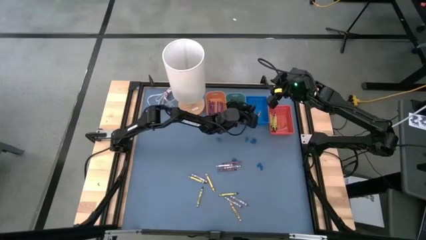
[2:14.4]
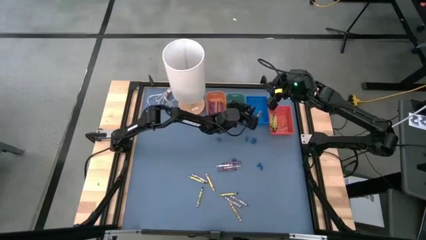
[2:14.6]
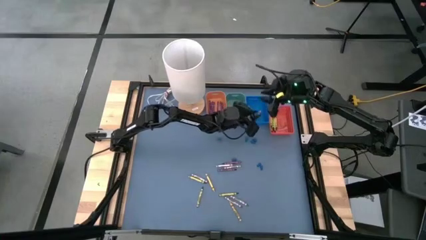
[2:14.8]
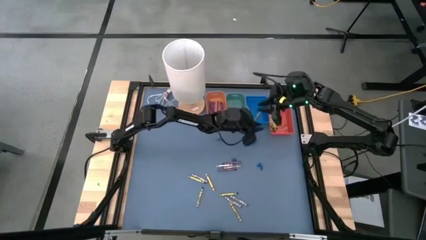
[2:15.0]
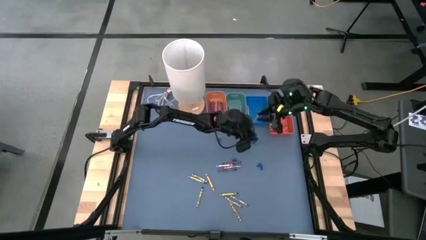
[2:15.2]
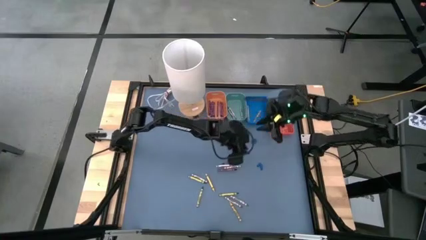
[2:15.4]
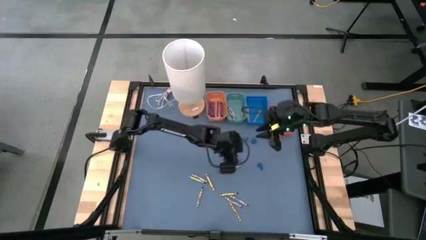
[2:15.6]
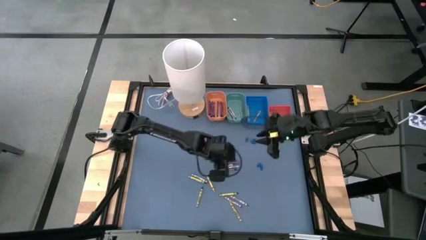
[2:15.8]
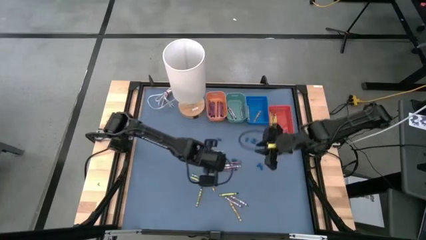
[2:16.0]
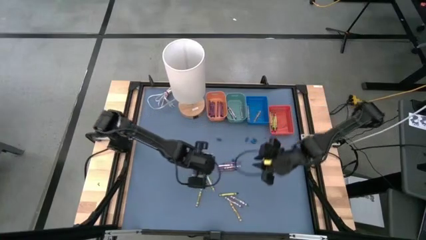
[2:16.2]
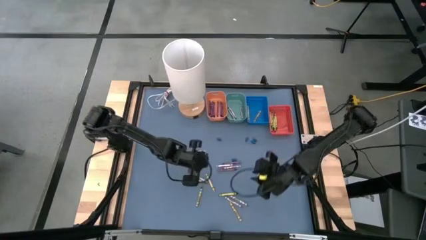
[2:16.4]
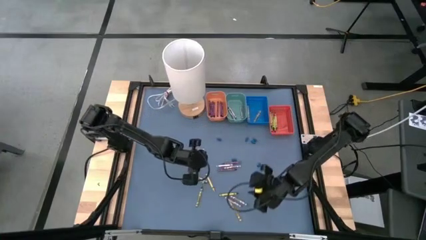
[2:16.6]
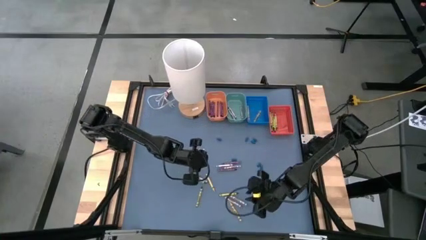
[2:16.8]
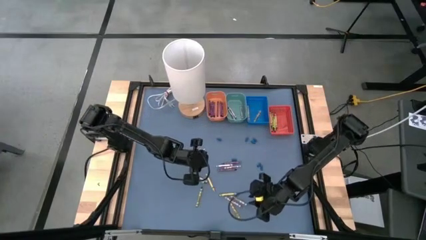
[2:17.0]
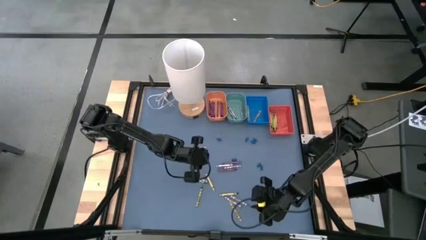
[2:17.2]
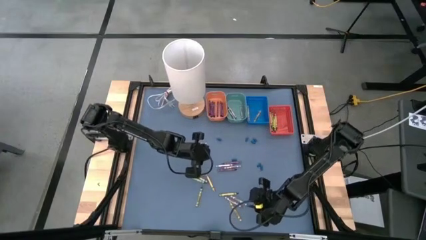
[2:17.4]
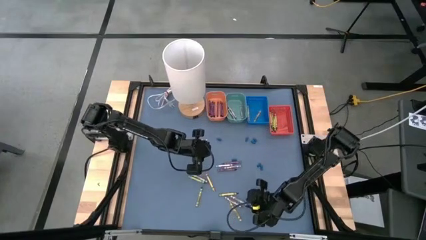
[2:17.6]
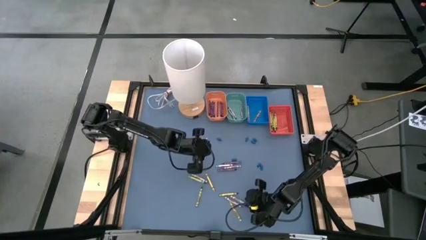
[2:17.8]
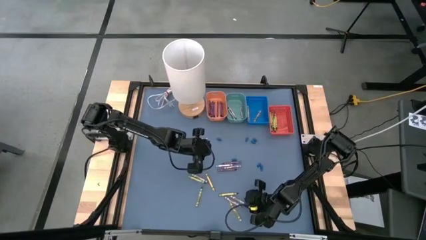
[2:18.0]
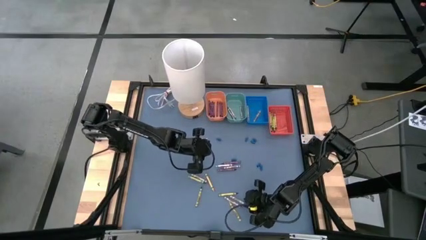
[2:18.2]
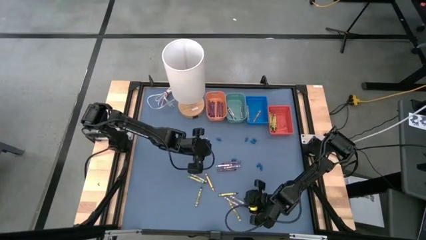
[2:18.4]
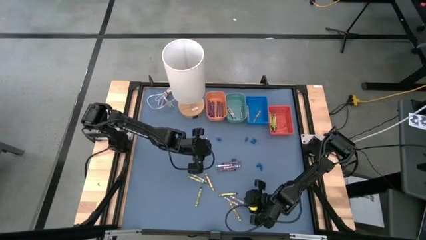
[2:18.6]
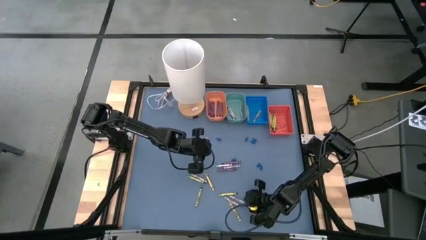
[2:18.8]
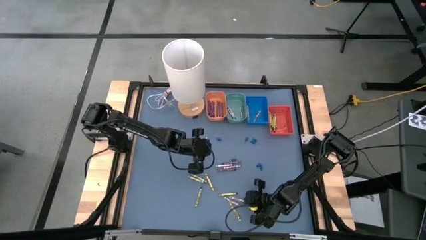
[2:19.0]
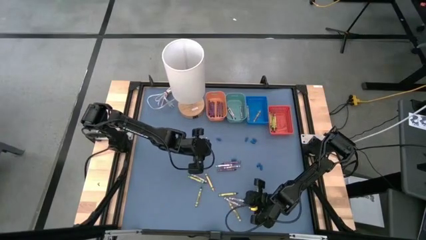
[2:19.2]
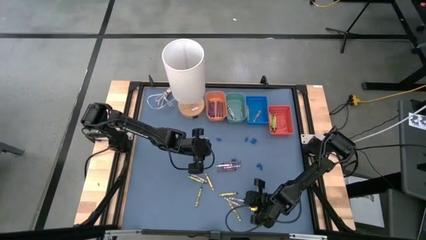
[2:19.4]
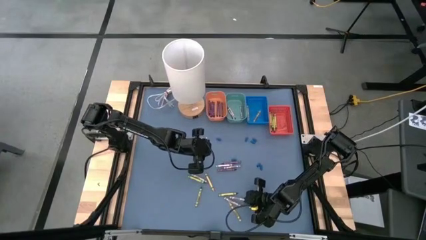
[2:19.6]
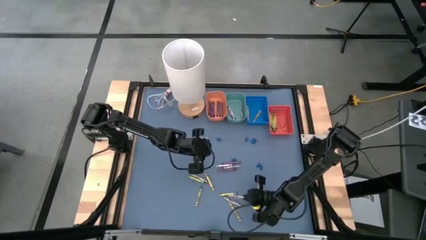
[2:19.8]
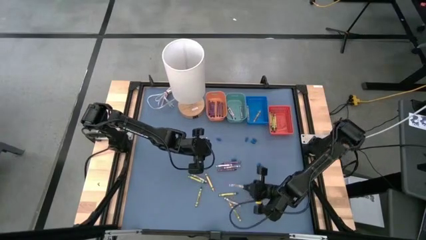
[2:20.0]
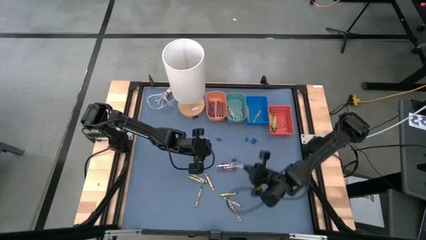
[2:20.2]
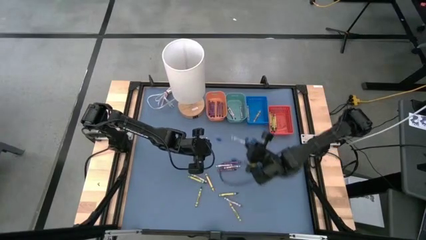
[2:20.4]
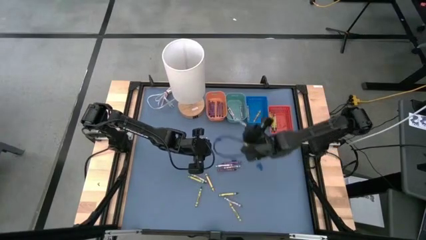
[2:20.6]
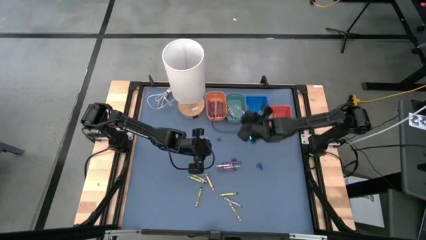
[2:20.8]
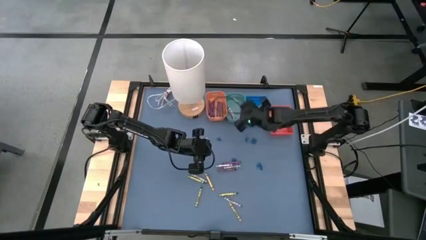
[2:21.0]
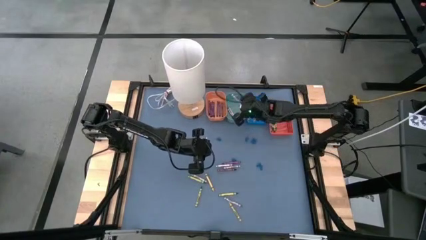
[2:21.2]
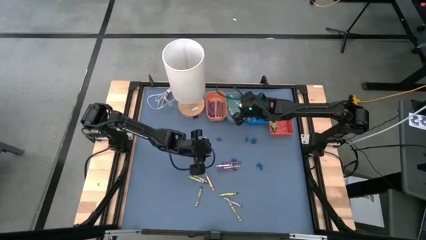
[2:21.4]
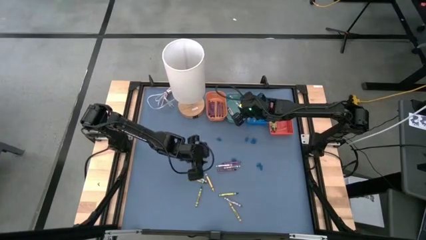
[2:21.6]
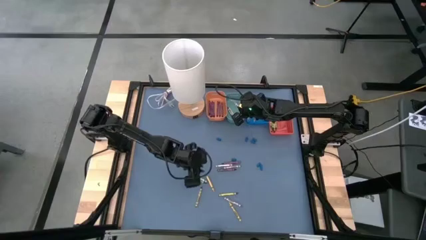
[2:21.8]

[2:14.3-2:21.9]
Task: Sort crayons
Put the gray crayon into the green bin

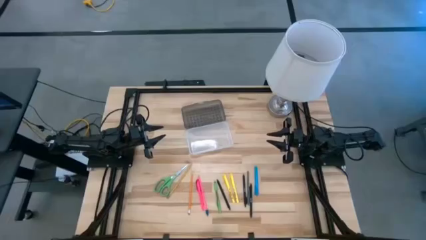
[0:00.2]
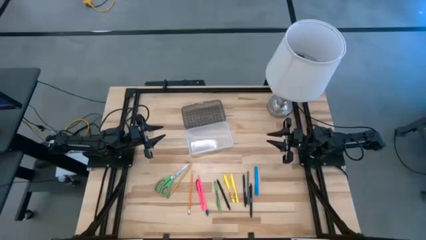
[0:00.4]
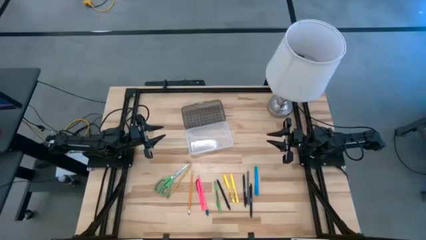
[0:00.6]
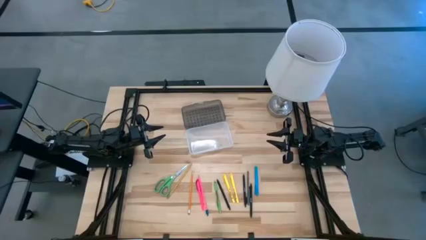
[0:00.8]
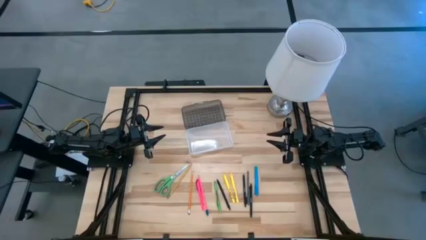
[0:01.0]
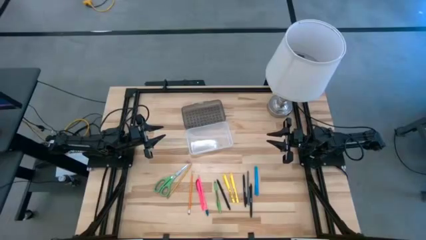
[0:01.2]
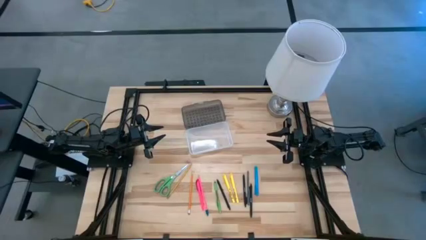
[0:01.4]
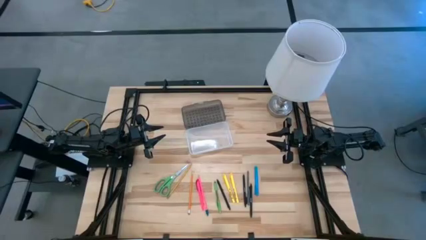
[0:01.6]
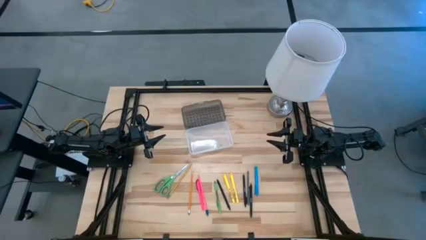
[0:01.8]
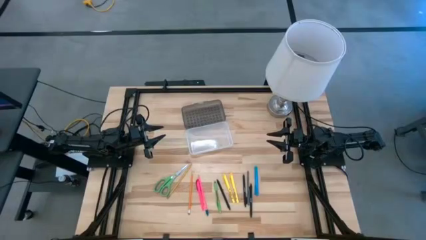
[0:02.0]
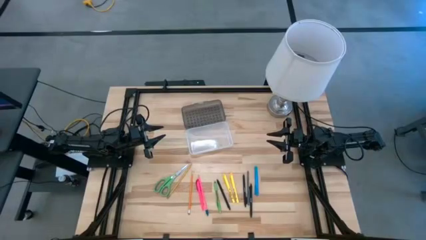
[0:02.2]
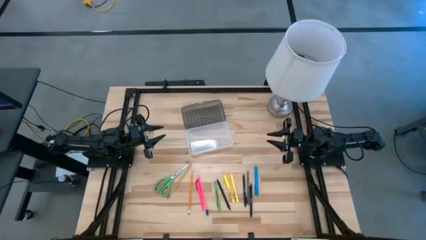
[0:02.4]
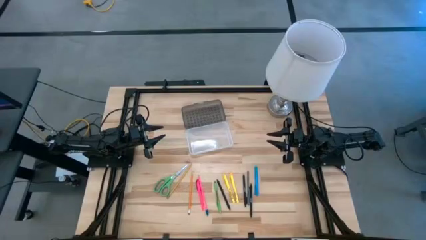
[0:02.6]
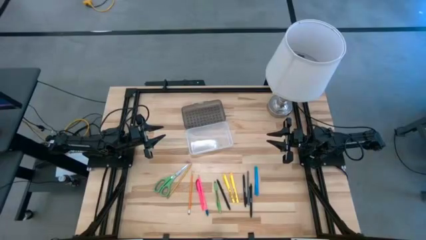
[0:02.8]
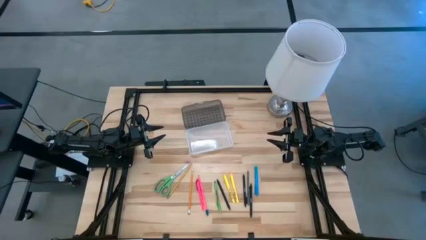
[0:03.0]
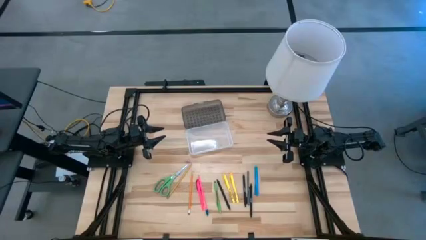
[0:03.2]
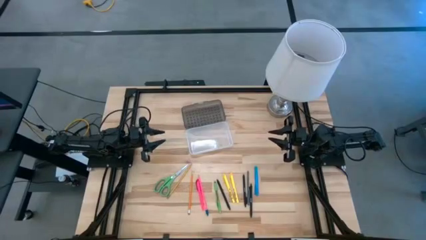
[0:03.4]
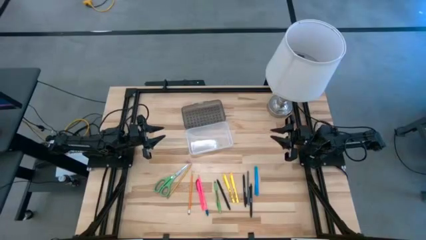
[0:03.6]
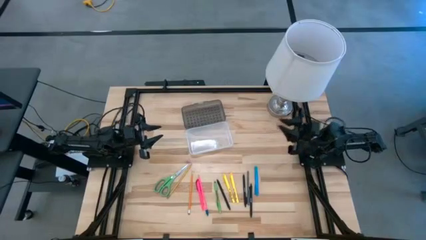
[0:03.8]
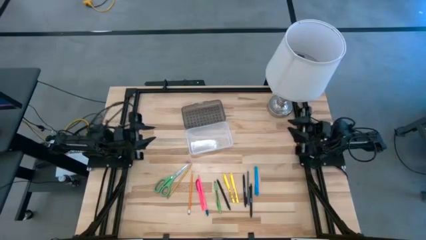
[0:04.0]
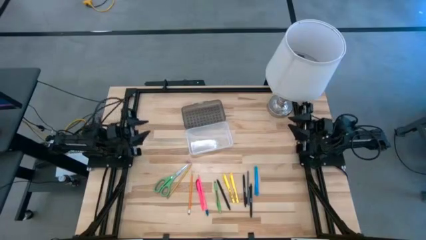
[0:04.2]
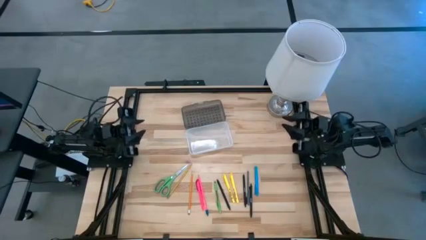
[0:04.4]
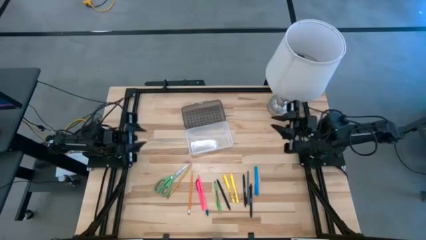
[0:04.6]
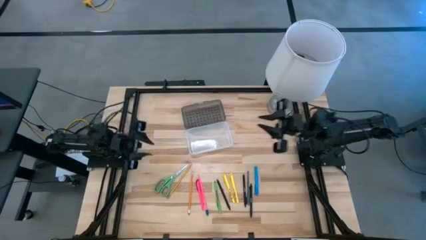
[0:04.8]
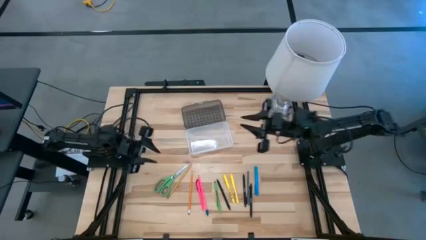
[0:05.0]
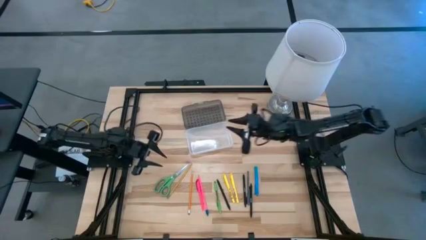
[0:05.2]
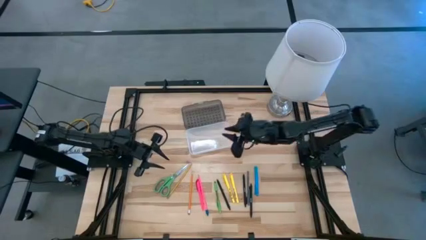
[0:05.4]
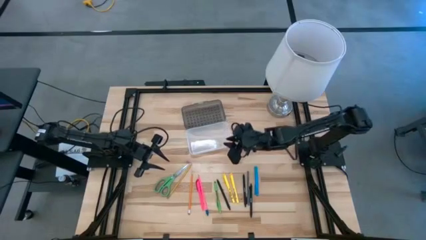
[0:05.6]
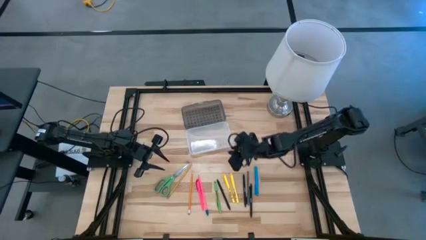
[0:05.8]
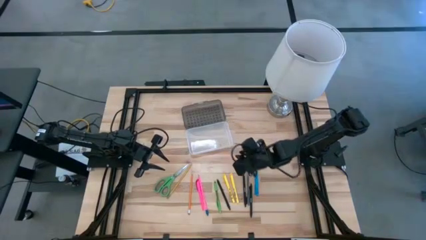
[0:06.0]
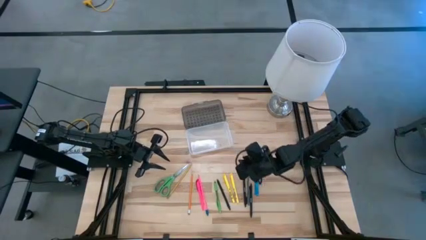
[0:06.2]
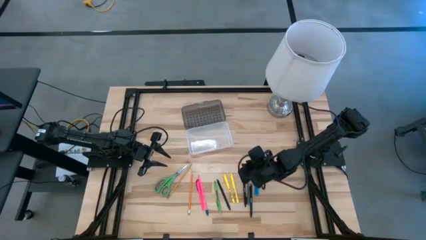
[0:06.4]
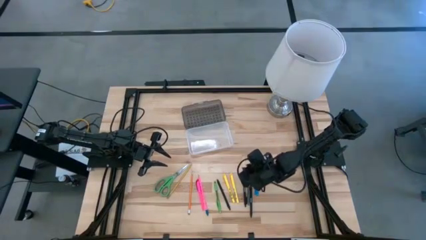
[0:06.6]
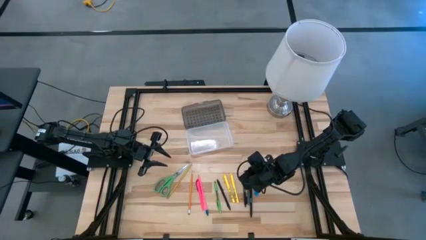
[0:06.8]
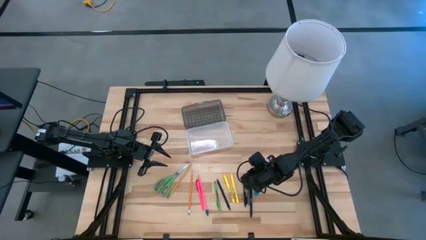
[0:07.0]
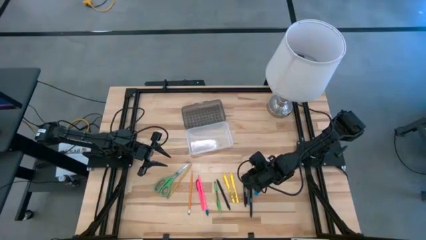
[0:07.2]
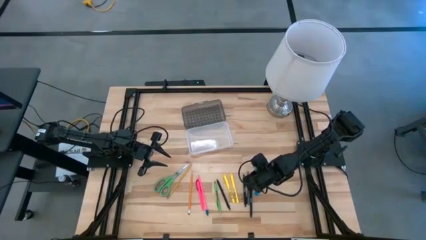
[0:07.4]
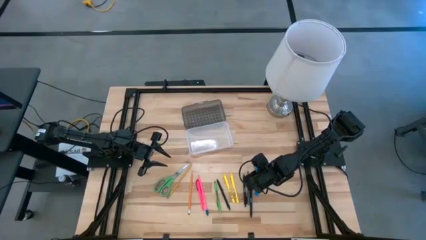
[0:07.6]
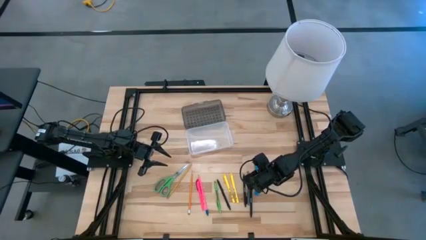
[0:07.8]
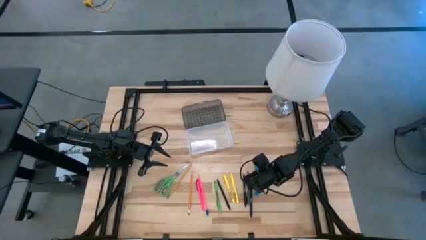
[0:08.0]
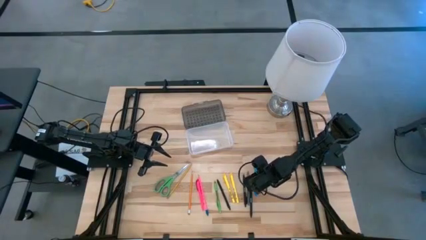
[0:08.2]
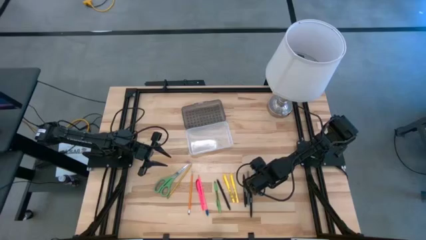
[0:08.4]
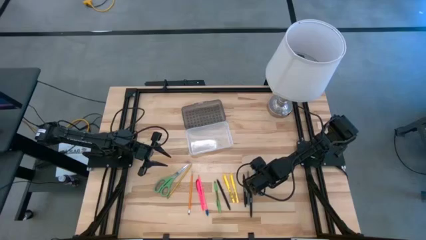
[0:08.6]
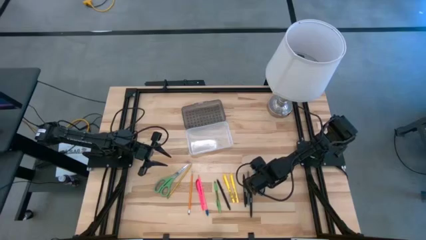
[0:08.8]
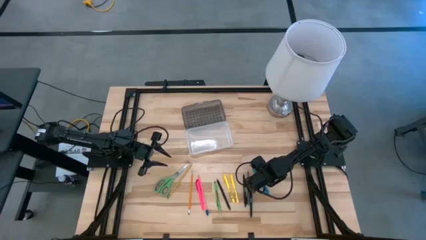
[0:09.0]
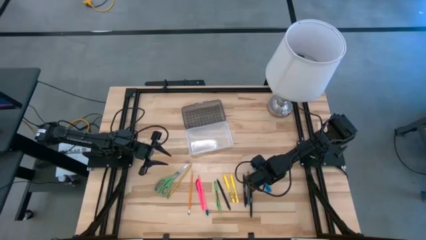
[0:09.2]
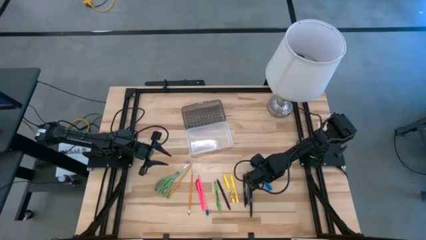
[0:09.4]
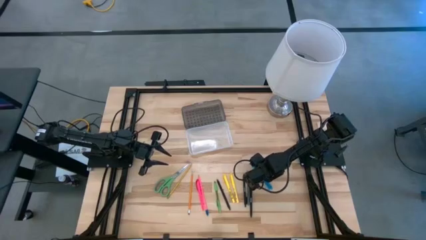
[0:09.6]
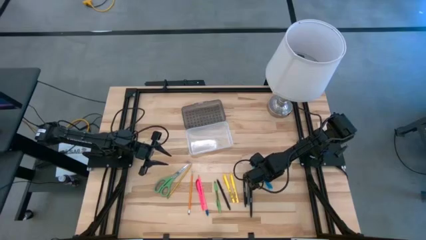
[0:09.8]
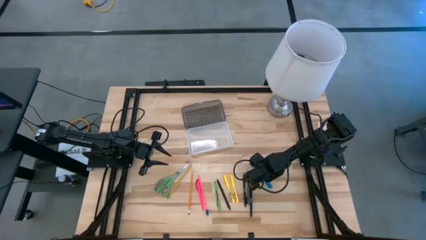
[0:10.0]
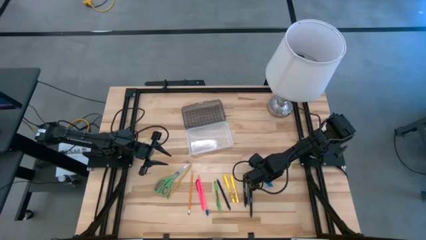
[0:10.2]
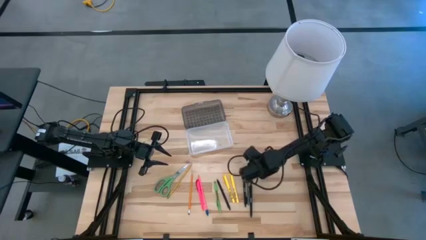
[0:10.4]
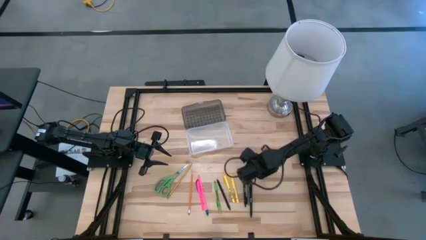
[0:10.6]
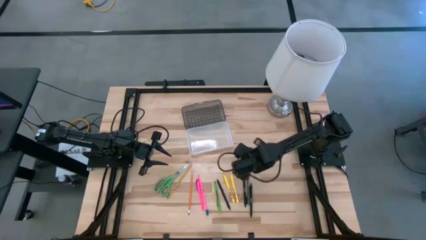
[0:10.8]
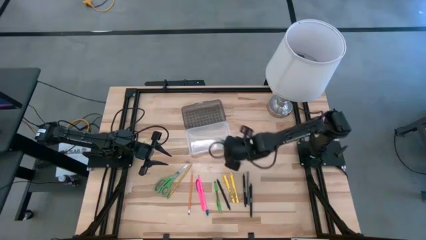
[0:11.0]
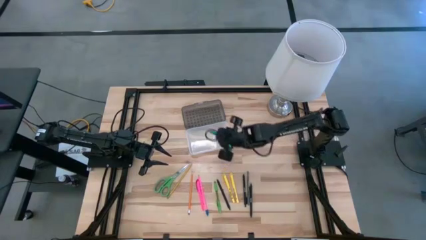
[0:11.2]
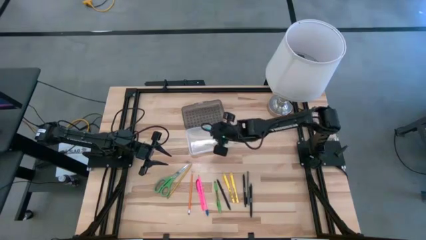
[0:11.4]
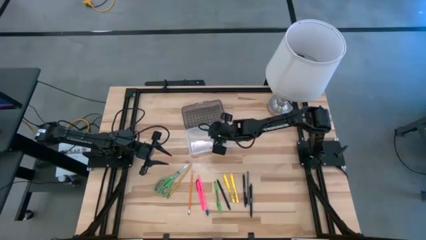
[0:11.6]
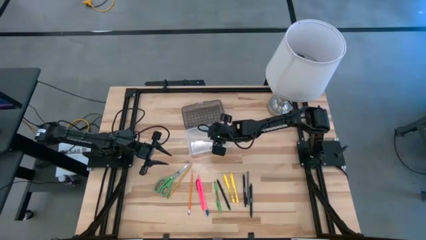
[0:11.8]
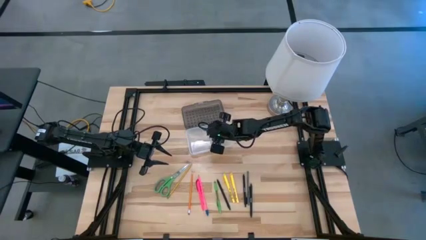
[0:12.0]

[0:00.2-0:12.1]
Task: Pick & place school supplies into a supply box
Put the blue pen into the transparent supply box
